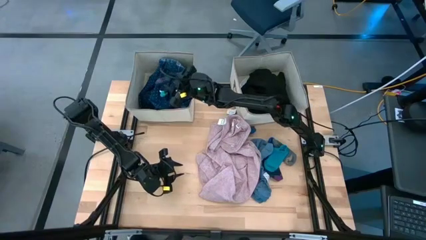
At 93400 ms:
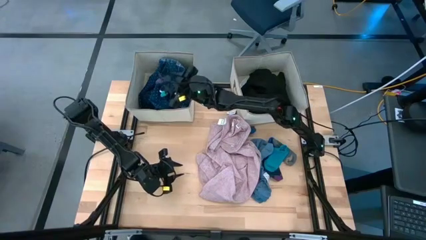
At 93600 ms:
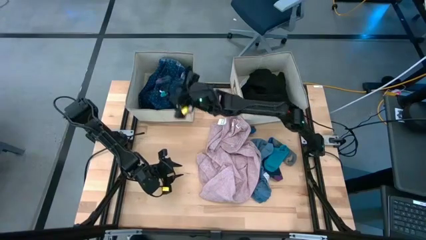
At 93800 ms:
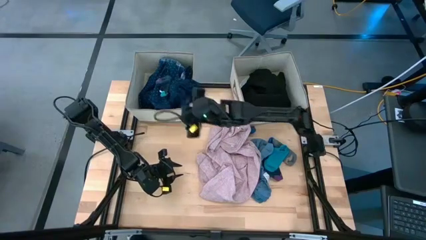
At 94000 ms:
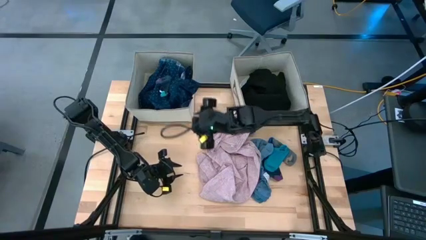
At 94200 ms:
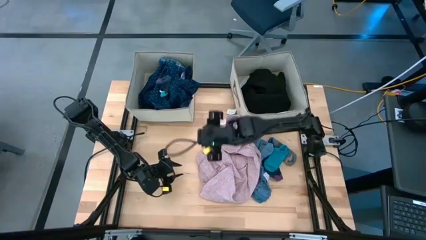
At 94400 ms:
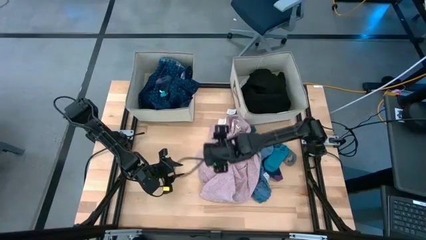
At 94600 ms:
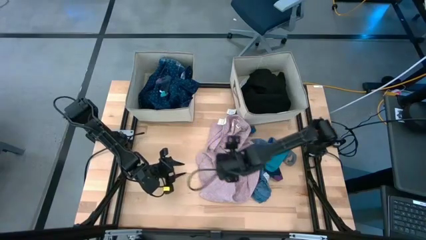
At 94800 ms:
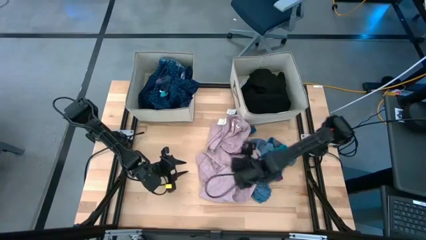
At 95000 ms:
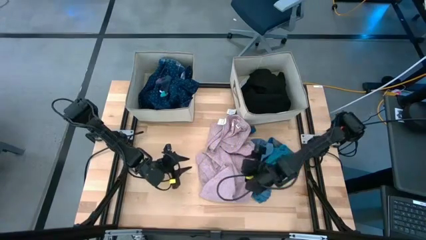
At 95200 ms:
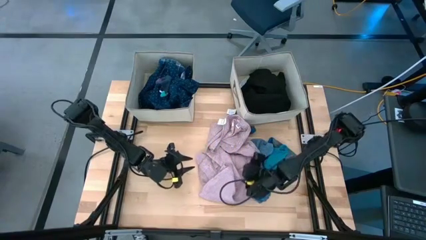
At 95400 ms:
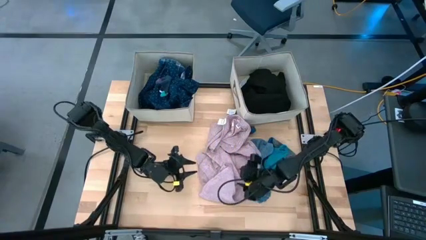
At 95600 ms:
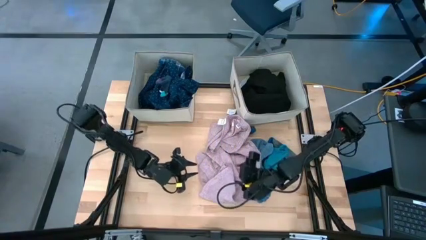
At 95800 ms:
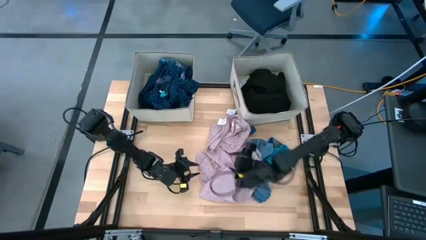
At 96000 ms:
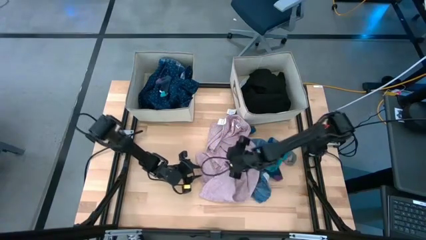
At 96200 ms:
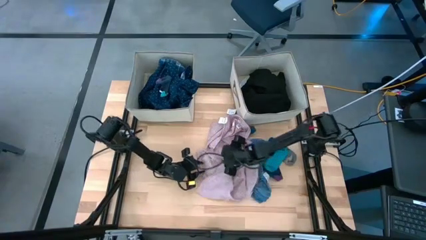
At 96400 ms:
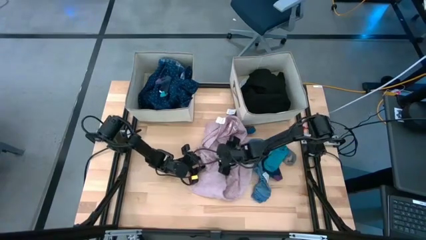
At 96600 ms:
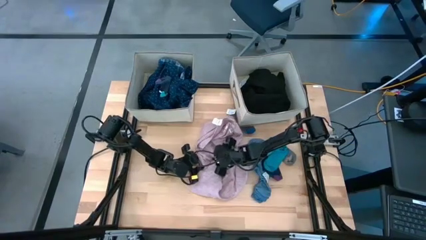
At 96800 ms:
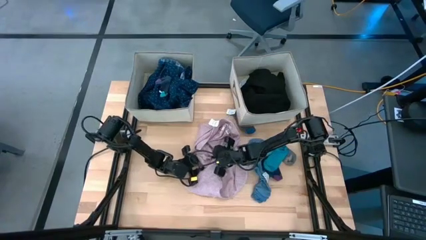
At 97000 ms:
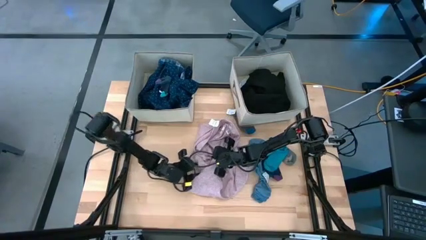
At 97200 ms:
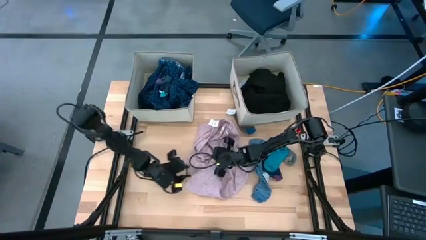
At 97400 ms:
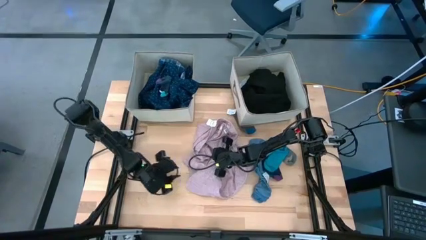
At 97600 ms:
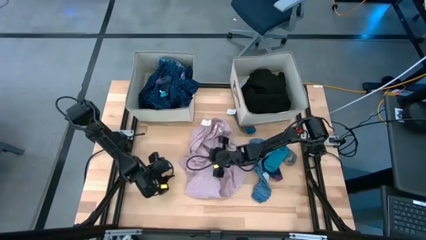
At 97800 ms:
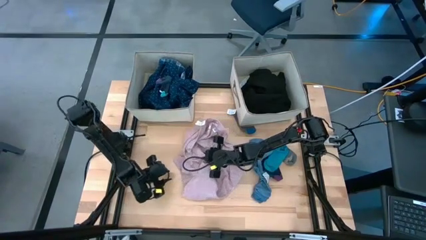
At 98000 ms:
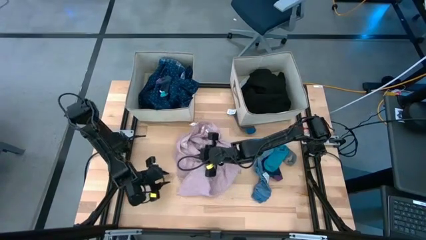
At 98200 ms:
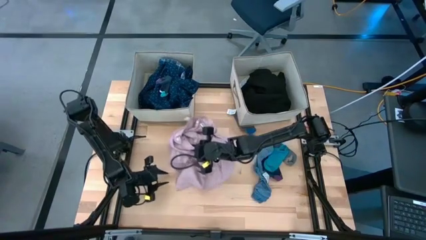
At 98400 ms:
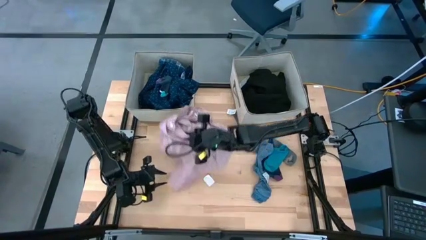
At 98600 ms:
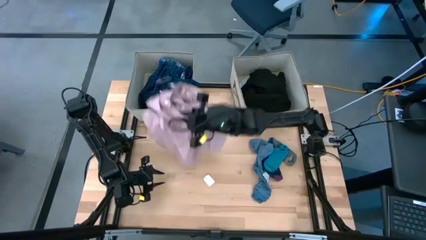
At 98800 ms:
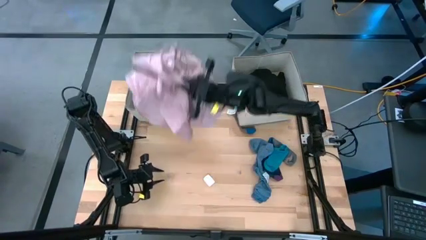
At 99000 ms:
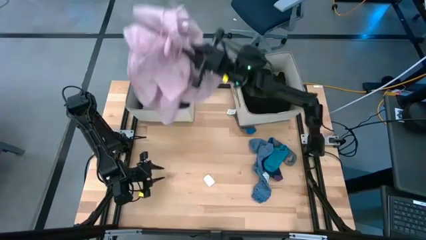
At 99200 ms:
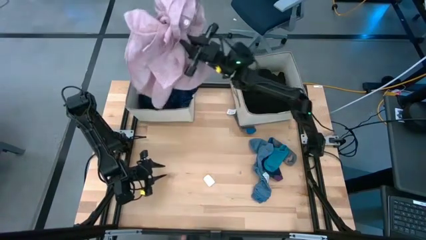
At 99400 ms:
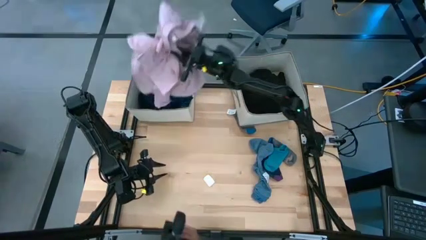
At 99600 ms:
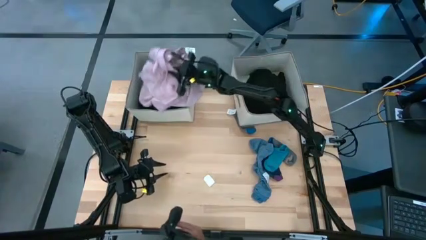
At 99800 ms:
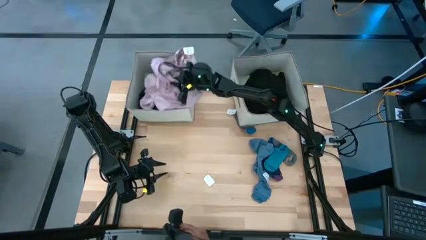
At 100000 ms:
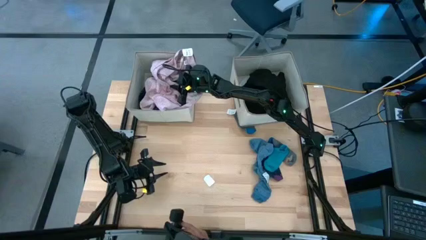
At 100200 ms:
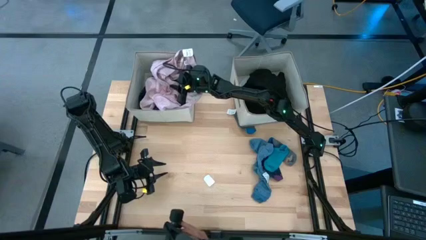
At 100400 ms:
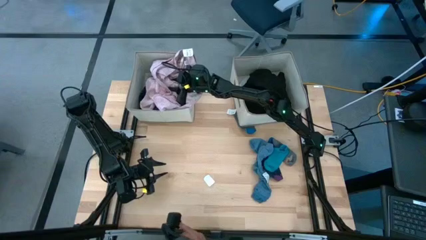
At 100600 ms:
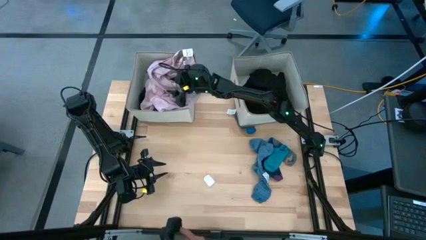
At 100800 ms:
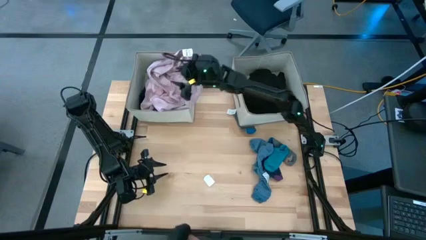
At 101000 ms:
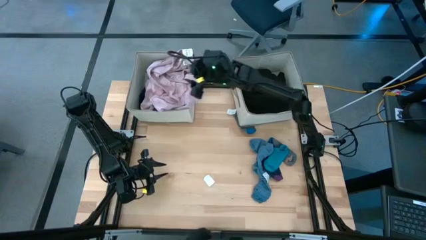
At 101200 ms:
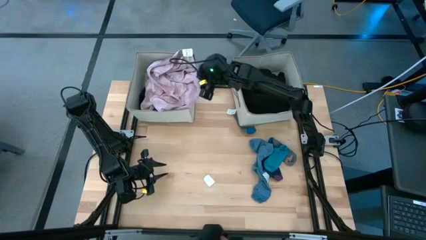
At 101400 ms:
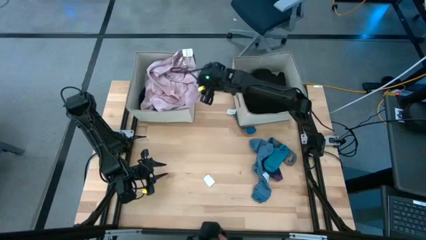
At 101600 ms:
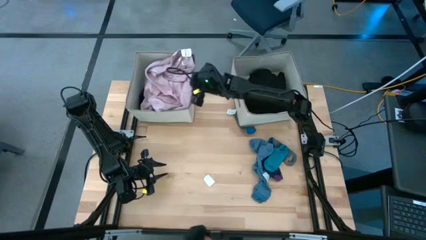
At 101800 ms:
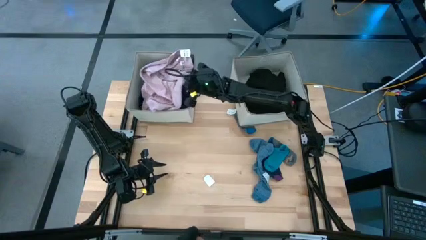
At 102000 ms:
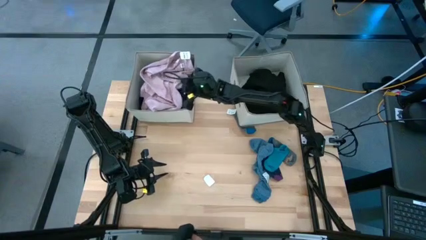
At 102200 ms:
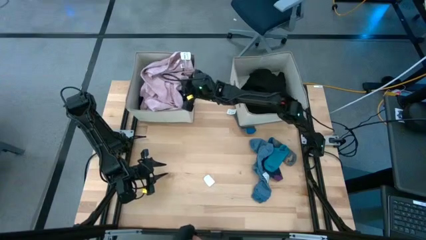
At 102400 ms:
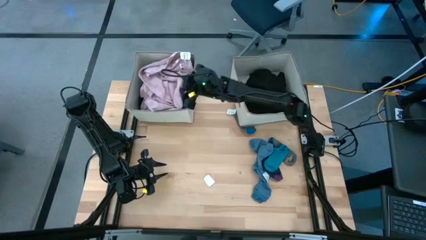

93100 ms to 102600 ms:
Task: Sort clothes
Put the pink polo shirt into the left brown laundry organizer

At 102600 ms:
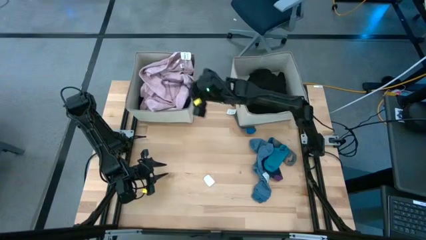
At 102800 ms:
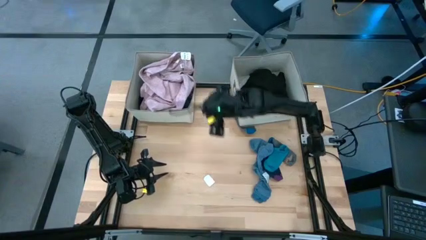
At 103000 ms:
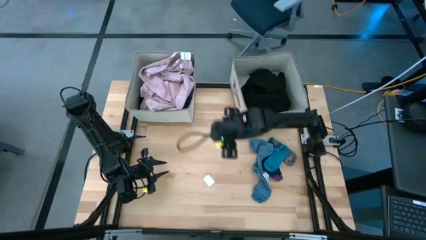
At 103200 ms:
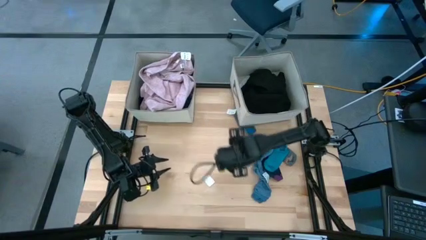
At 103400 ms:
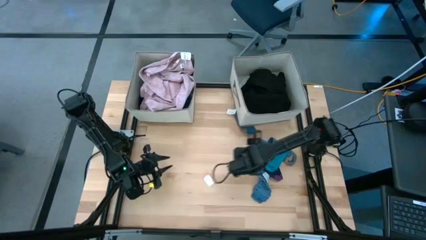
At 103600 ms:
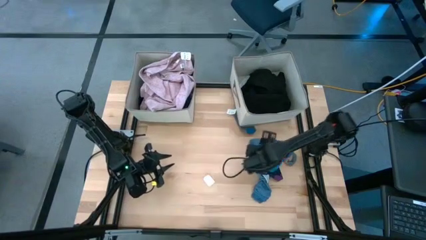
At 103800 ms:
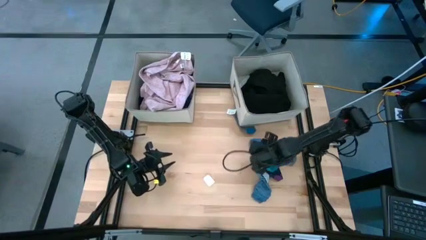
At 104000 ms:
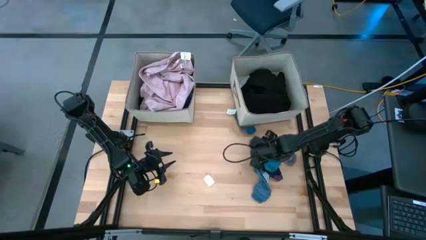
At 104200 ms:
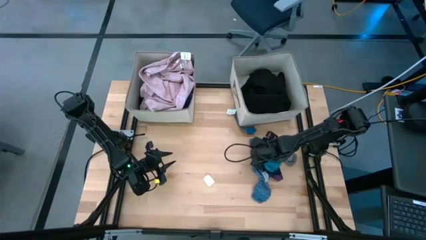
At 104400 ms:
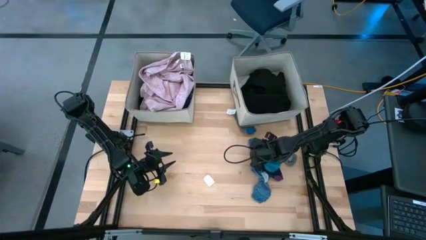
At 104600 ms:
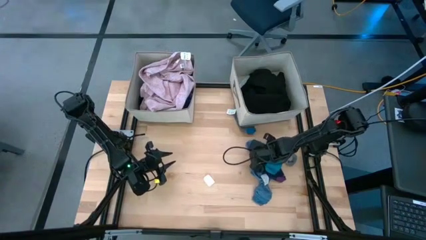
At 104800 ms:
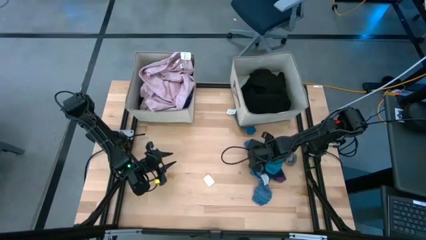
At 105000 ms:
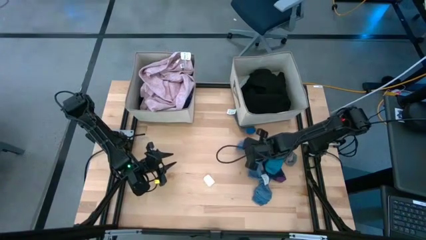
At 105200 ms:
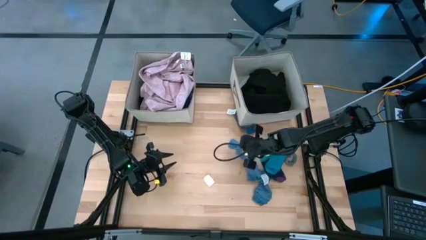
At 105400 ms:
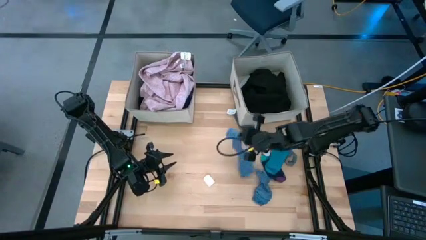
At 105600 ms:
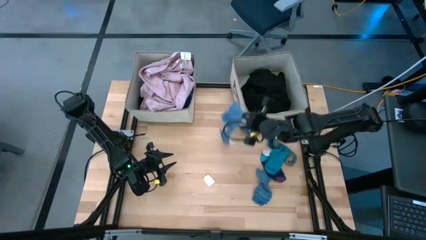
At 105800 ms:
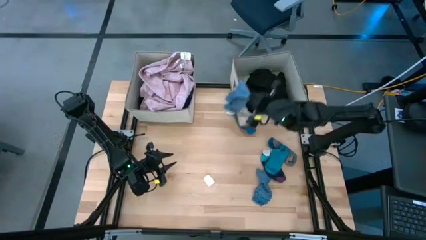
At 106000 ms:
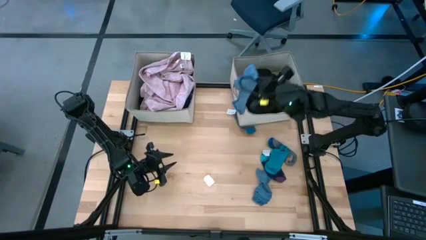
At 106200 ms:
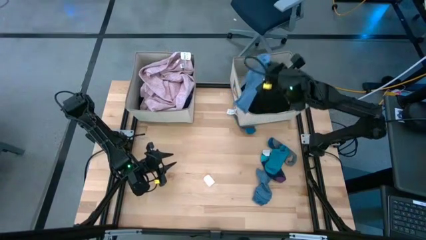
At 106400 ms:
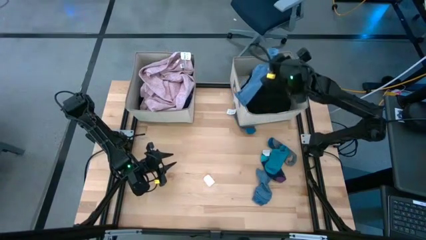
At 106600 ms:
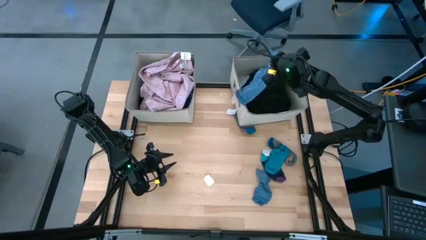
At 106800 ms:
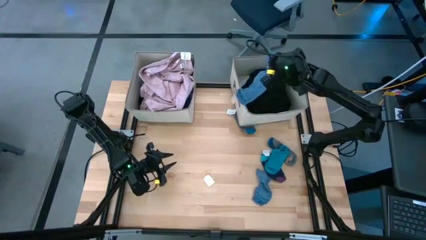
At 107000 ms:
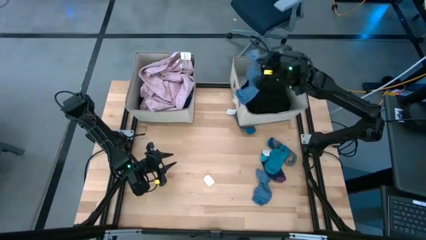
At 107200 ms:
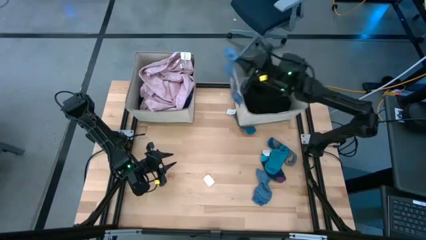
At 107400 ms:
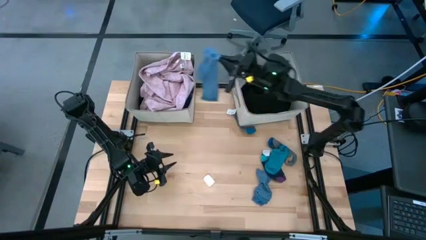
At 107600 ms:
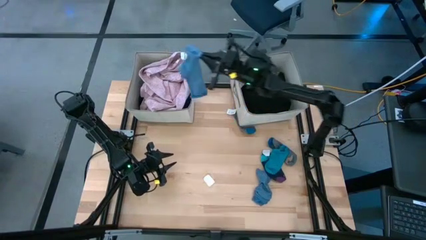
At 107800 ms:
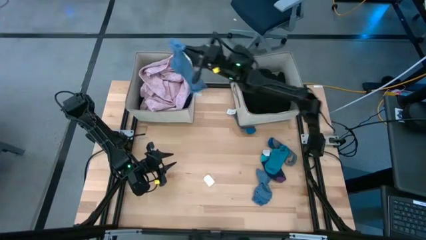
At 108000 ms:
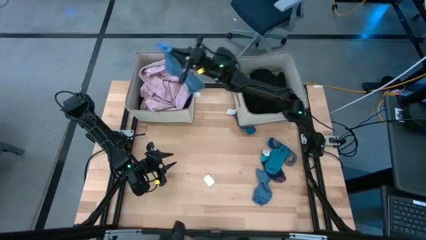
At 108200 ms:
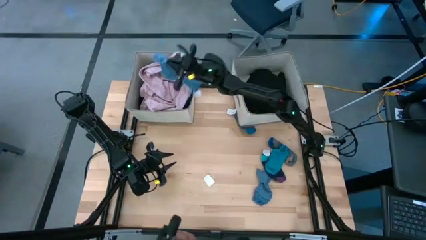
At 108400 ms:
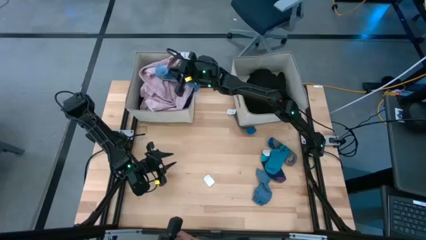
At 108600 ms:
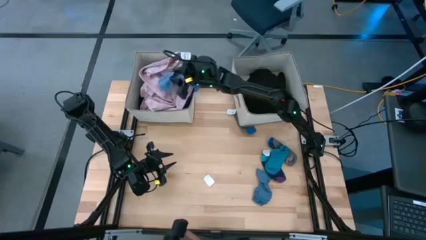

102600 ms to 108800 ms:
Put the blue sock into the left brown laundry organizer

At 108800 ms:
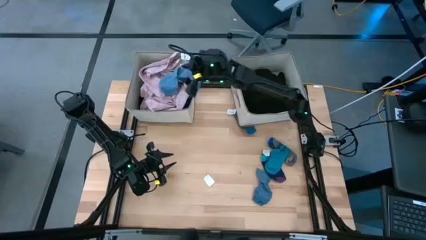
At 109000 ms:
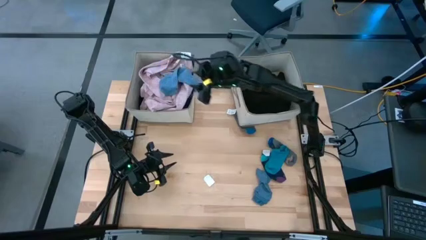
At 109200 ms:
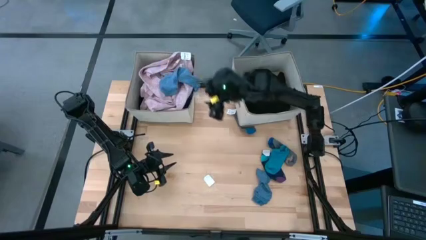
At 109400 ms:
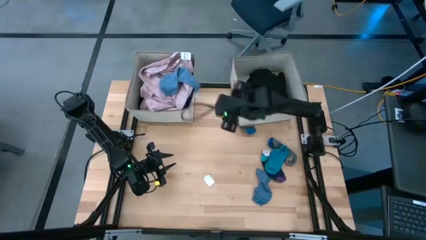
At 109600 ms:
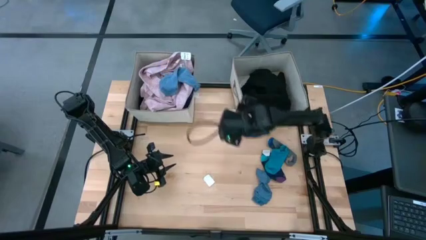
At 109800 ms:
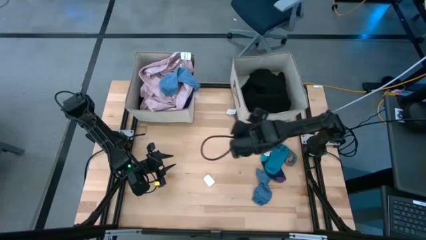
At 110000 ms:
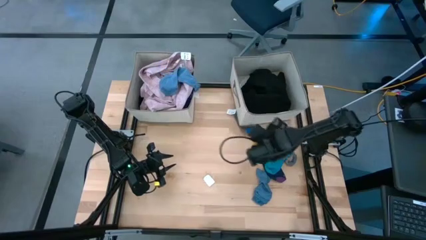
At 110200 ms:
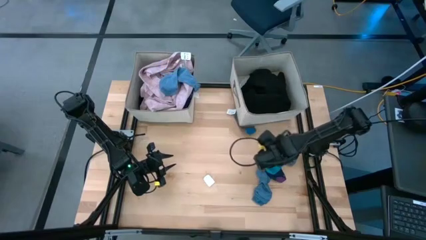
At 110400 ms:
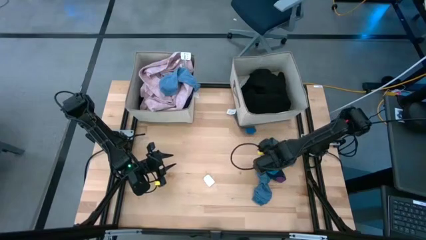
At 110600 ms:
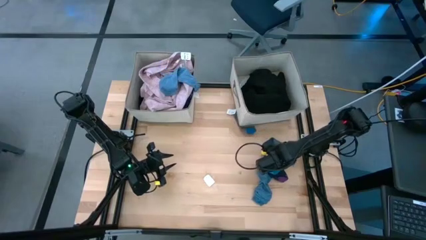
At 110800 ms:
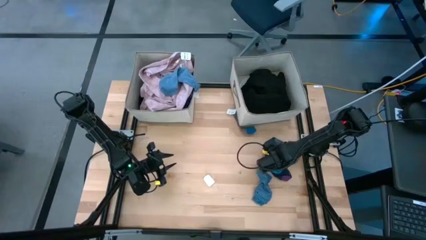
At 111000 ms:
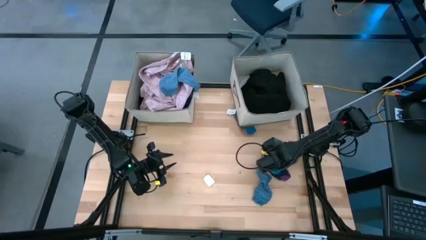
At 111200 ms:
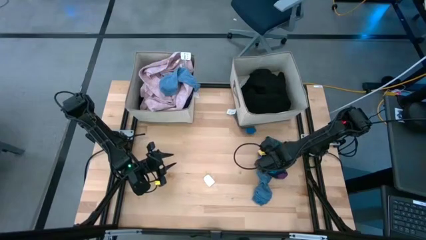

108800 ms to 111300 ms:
Put the blue sock into the left brown laundry organizer
